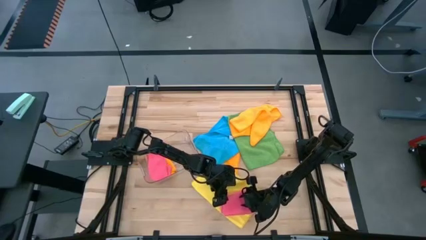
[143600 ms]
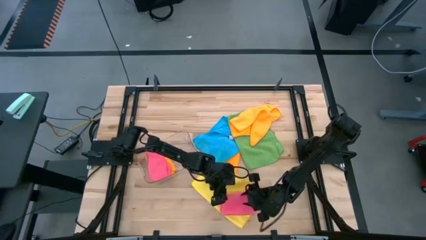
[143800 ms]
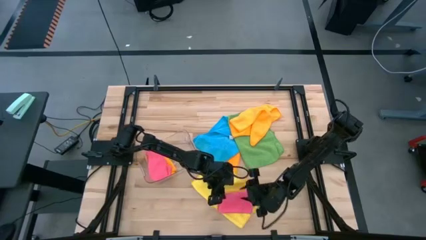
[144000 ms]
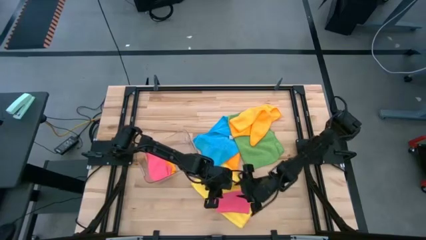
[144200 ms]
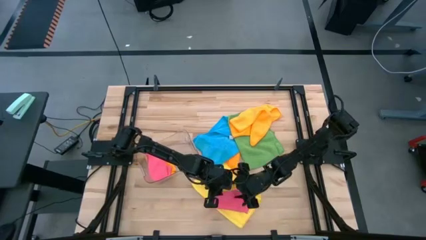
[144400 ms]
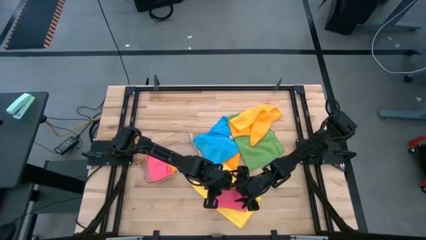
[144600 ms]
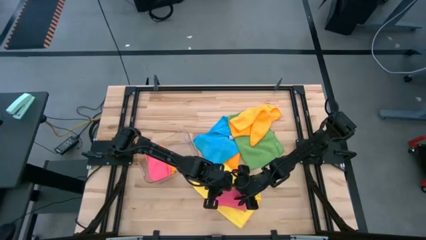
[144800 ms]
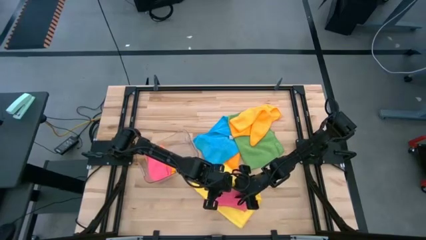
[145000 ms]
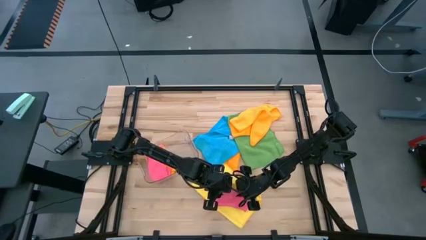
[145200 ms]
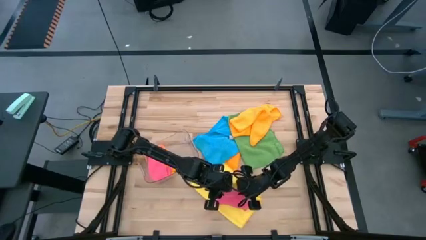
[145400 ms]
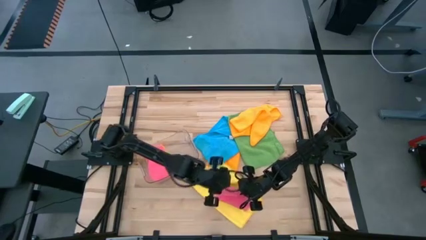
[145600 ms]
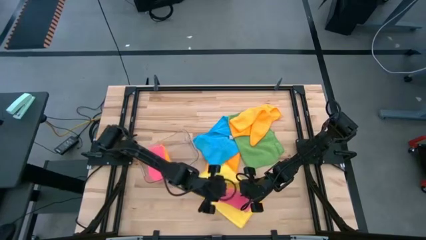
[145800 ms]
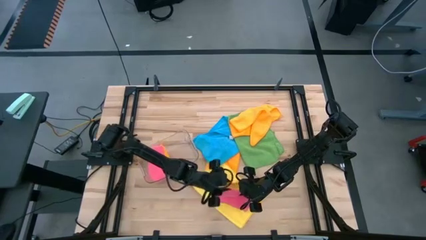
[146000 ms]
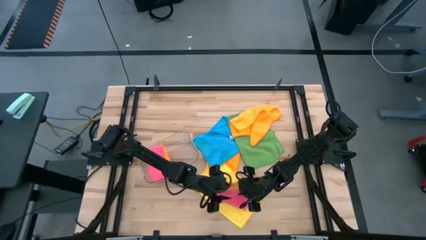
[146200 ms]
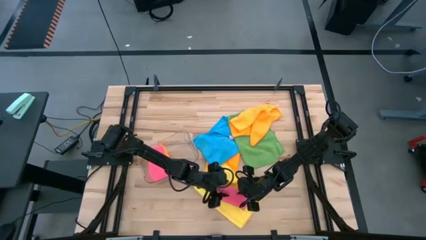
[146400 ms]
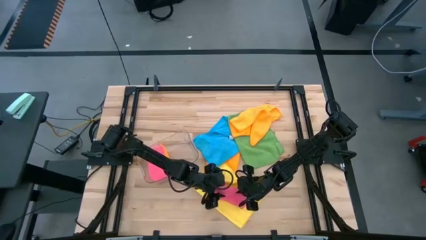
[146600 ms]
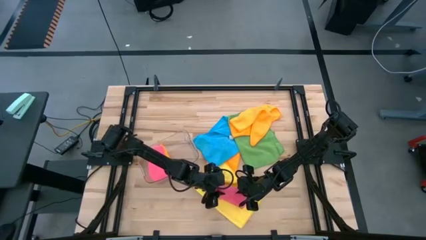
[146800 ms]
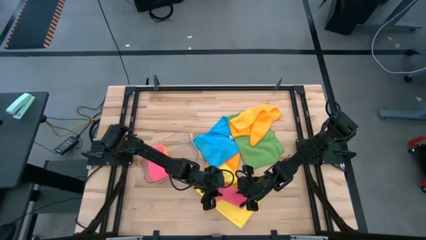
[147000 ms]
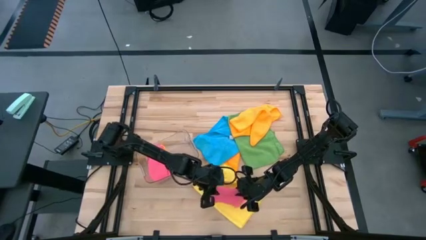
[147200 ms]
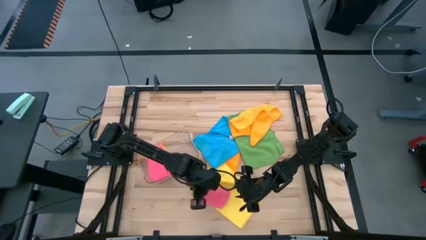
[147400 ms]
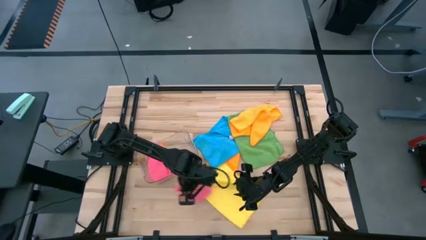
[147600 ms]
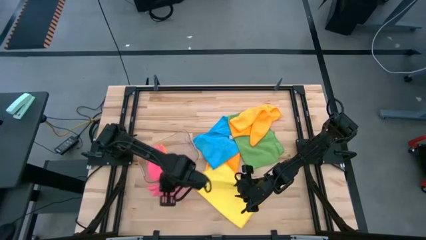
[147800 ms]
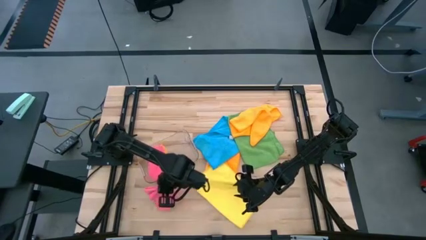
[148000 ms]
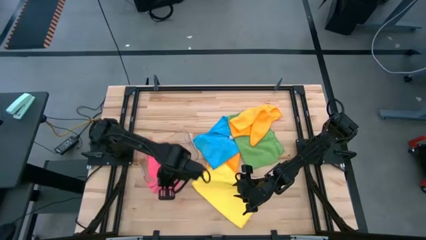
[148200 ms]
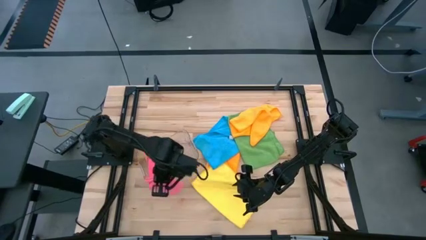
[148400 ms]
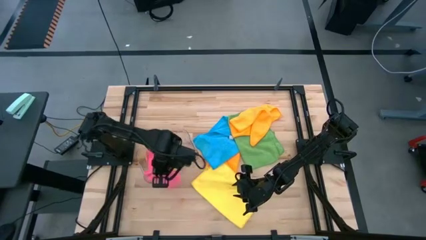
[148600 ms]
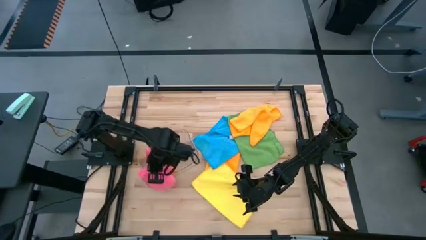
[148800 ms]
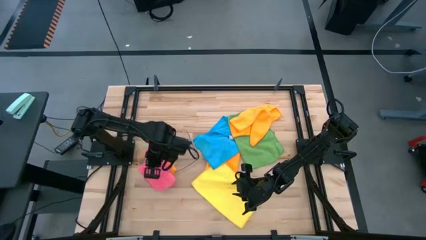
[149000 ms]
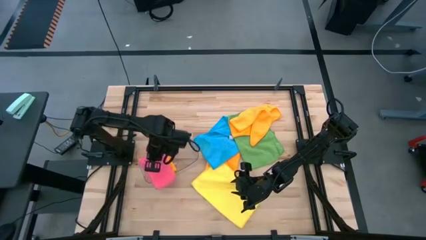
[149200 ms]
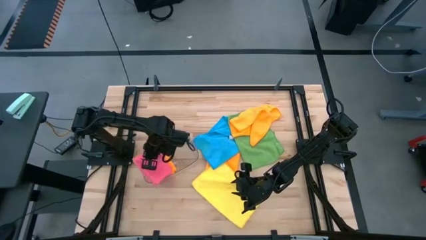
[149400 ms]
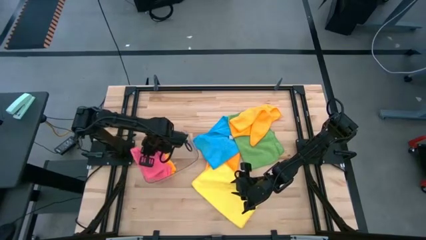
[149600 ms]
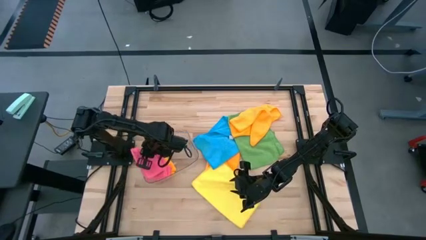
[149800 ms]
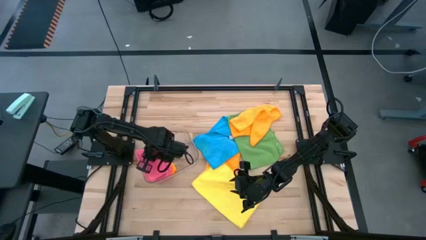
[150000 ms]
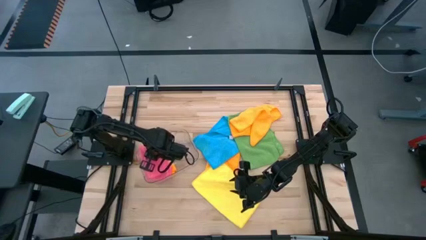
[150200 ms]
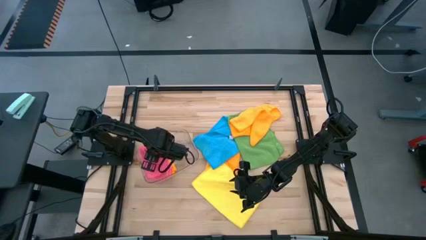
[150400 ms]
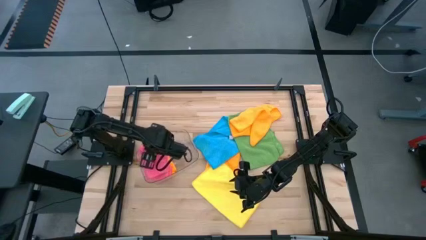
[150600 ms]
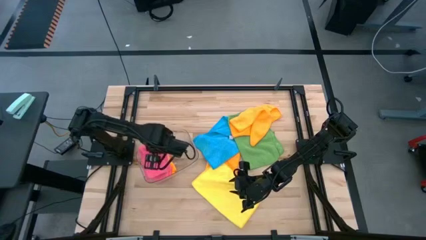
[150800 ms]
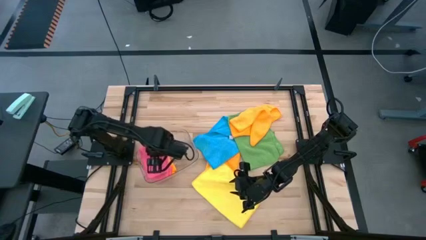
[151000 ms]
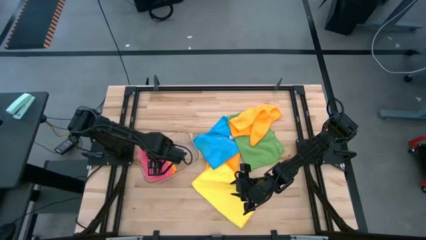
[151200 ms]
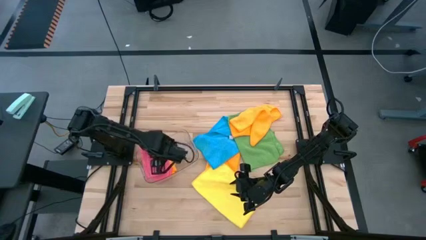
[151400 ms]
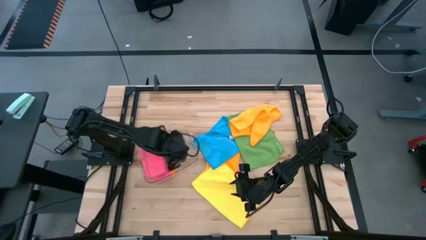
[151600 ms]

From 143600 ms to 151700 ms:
Task: Fold microfiber towels
Put the folded pink microfiber cloth into the transparent bin

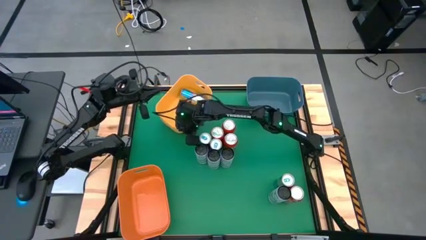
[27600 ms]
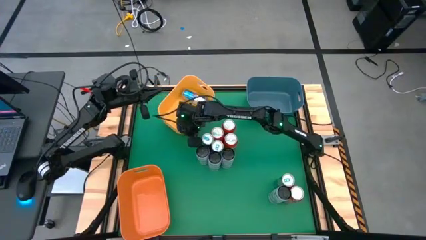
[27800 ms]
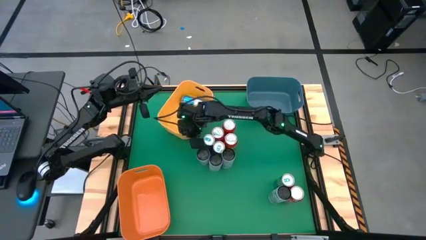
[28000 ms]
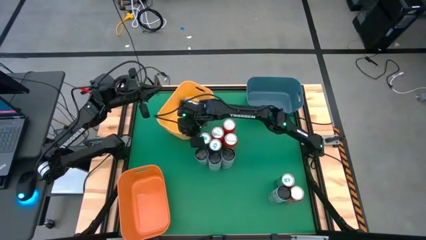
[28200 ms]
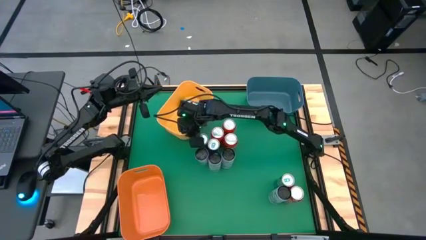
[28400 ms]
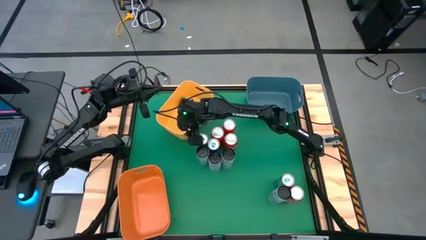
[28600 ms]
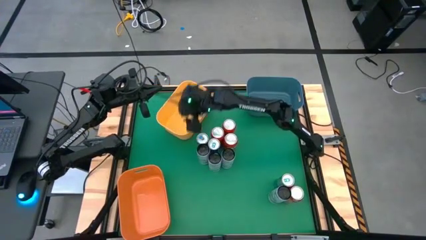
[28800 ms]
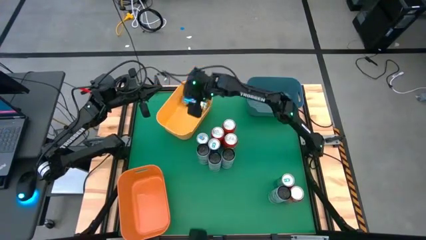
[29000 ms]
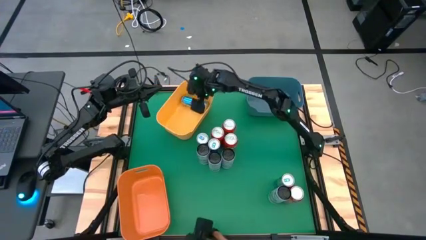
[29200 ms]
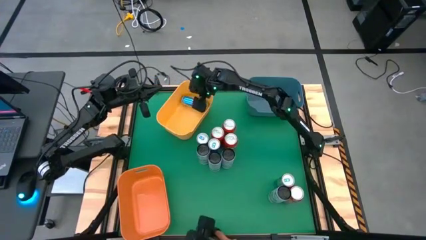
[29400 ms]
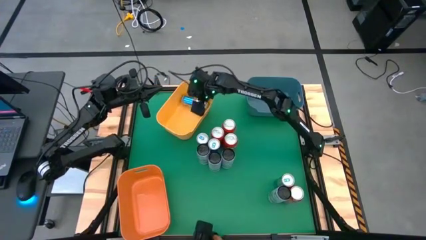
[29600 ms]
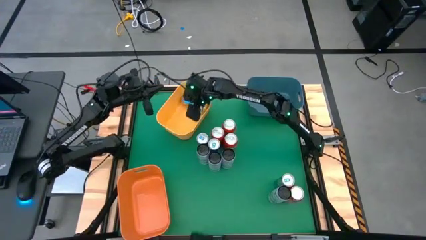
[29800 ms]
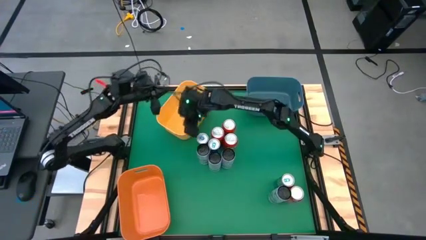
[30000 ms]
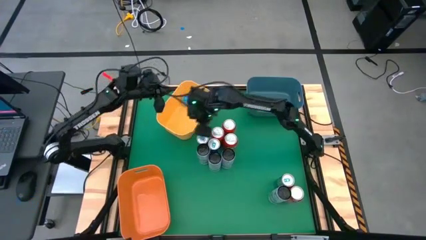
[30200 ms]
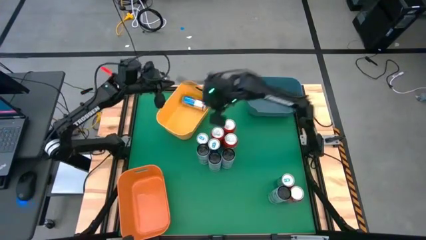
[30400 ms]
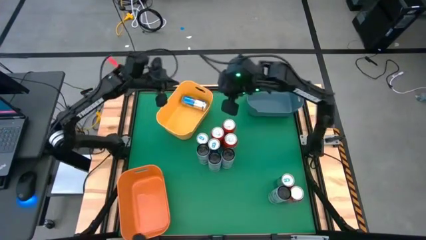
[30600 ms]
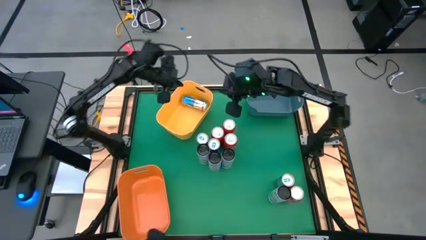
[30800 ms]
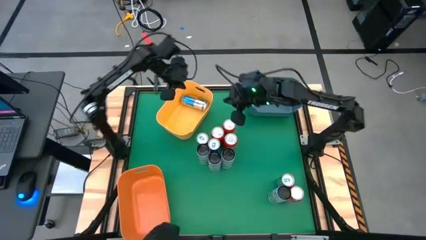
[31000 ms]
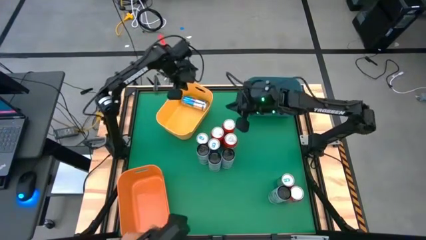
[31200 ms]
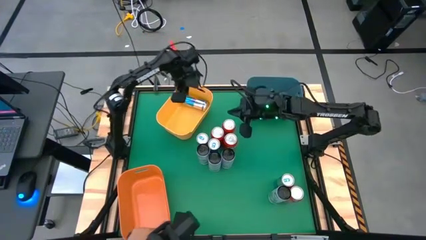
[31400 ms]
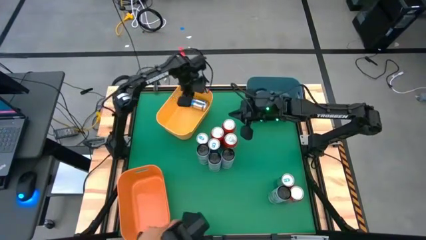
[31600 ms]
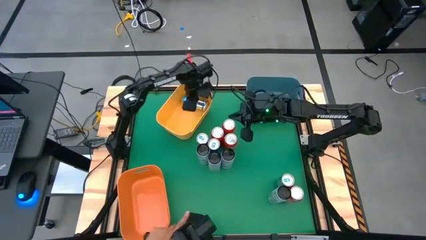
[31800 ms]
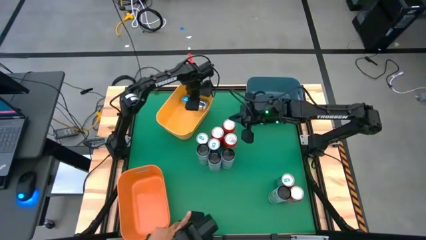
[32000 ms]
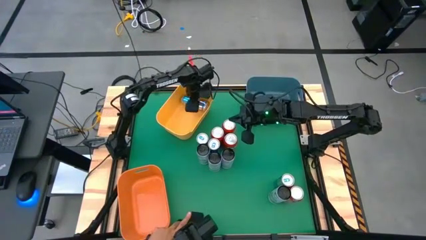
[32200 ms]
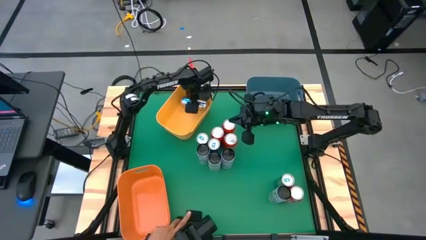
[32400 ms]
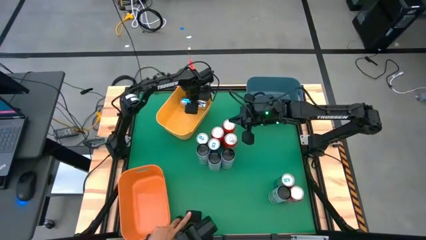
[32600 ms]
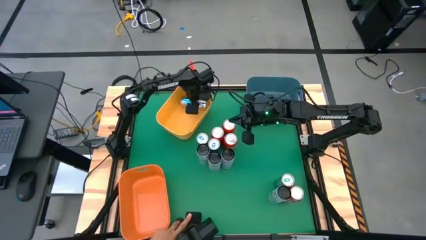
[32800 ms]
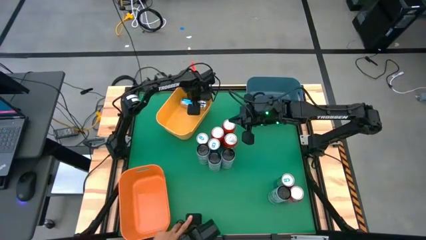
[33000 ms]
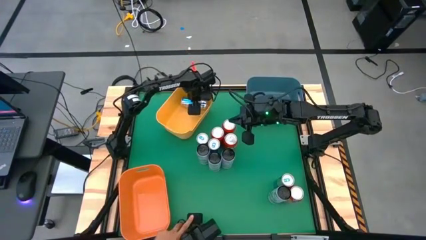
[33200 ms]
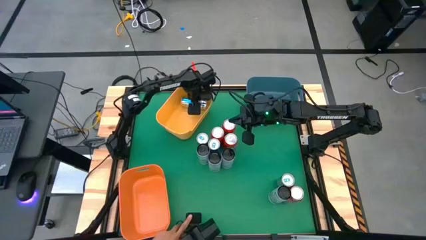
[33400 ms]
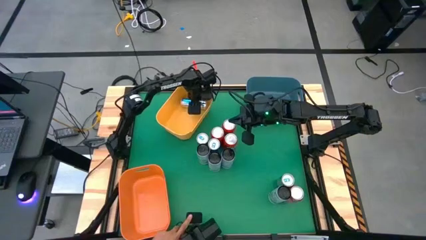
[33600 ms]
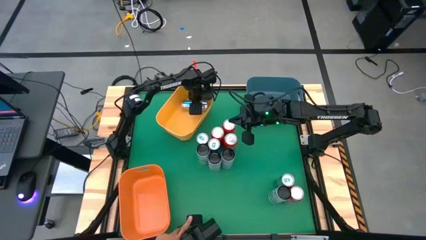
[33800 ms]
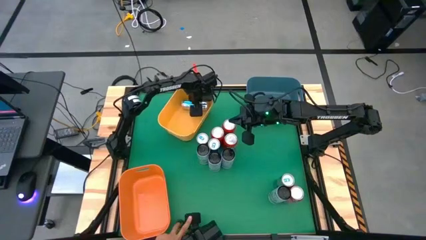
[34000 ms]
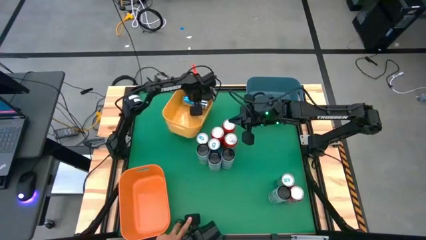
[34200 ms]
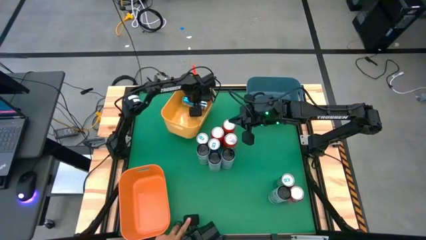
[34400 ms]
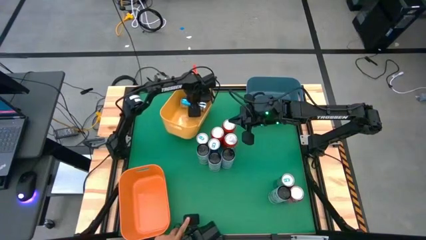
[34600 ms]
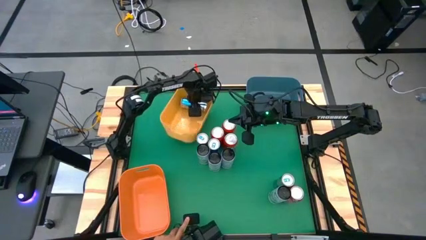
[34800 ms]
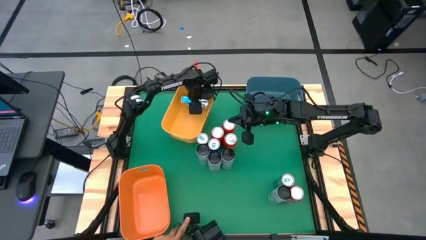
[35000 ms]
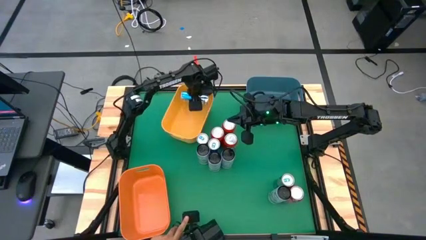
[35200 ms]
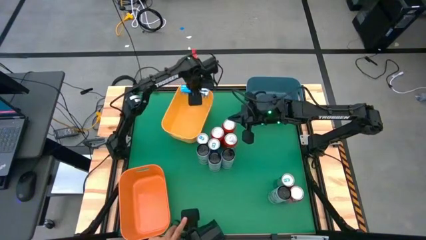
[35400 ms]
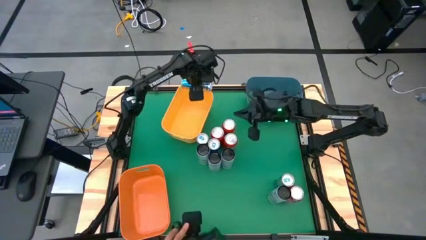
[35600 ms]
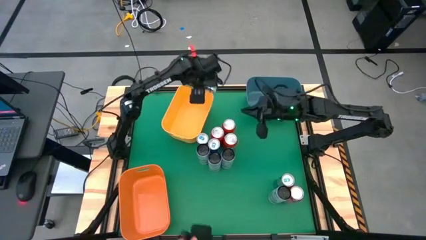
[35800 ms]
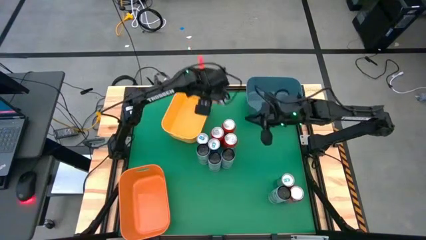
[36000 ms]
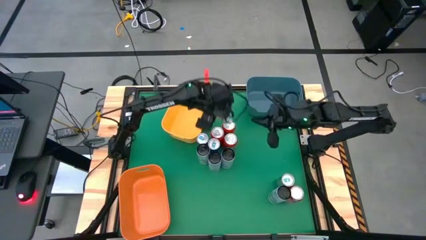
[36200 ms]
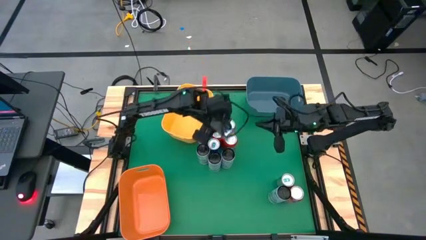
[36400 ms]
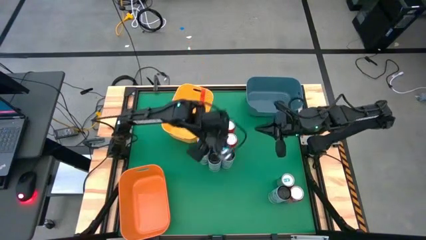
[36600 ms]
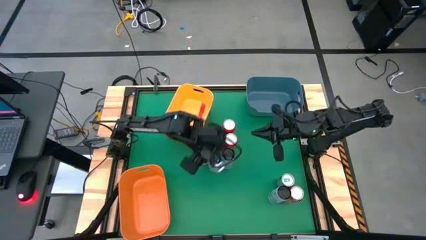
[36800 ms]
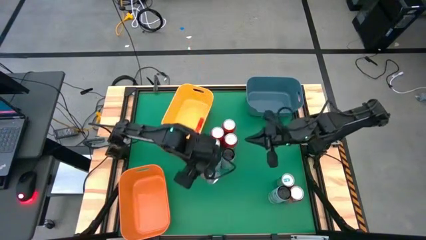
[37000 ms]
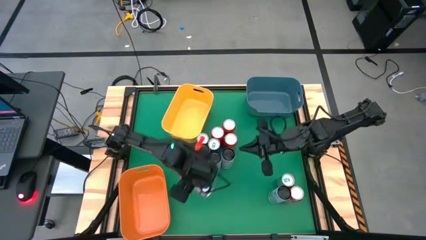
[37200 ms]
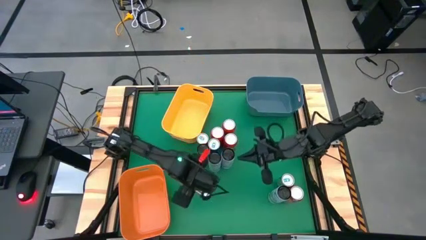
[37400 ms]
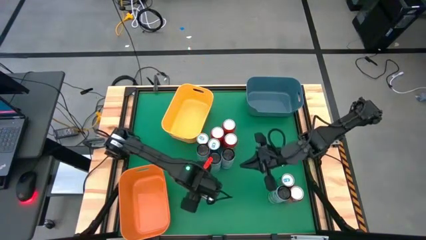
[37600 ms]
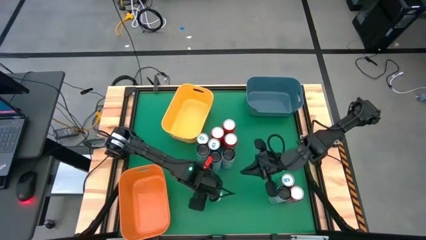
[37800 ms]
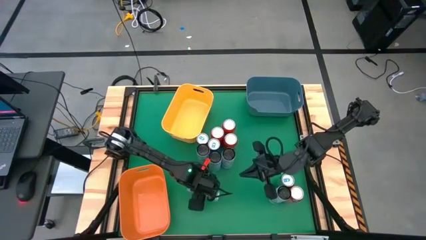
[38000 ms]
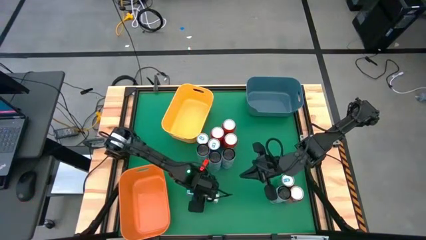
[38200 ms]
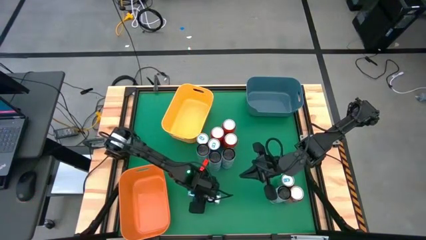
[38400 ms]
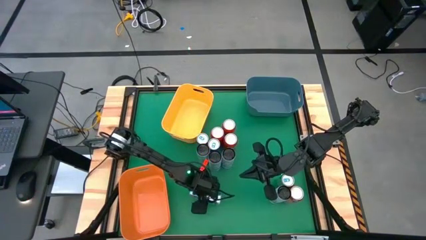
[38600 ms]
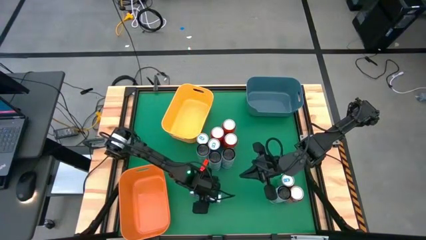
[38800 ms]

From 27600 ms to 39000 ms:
Task: Sort soda cans
Remove the blue soda can from the yellow bin
